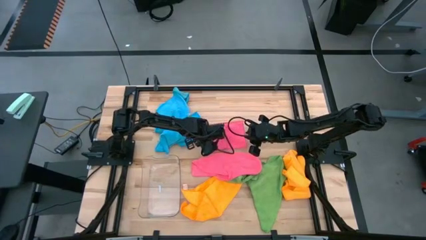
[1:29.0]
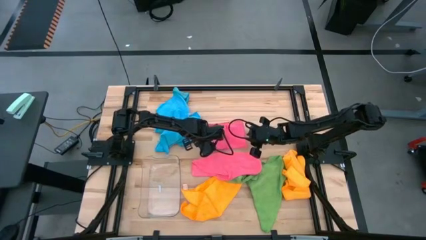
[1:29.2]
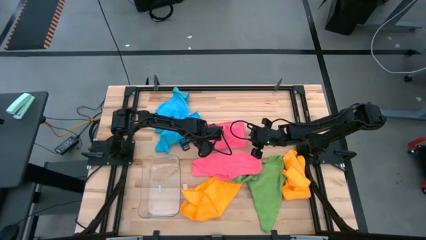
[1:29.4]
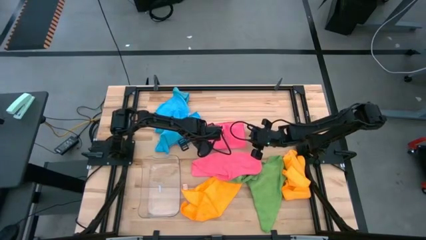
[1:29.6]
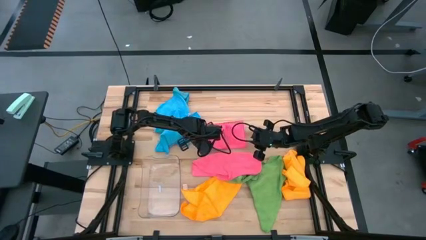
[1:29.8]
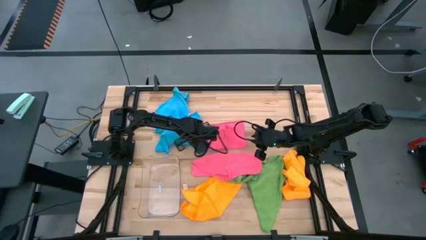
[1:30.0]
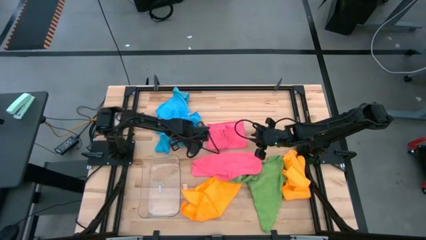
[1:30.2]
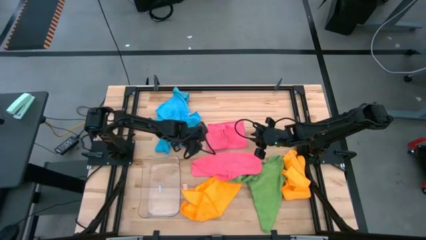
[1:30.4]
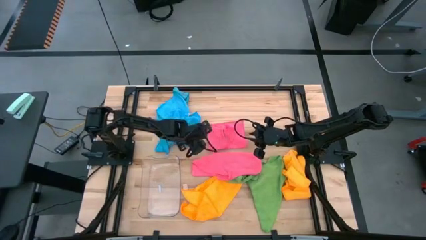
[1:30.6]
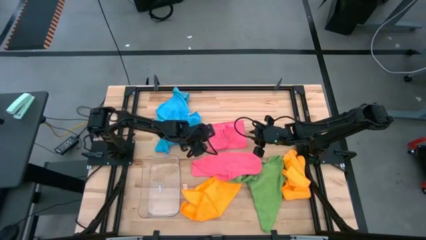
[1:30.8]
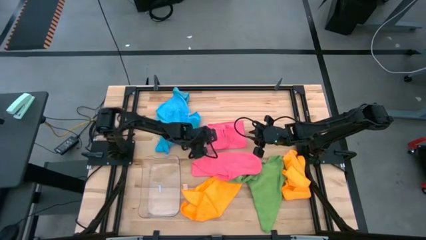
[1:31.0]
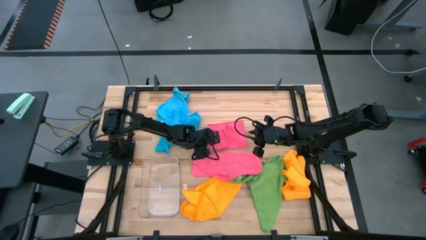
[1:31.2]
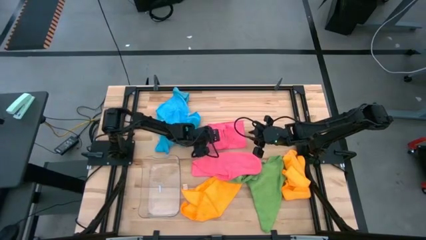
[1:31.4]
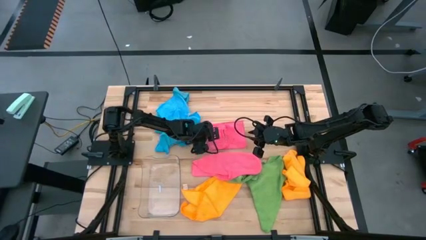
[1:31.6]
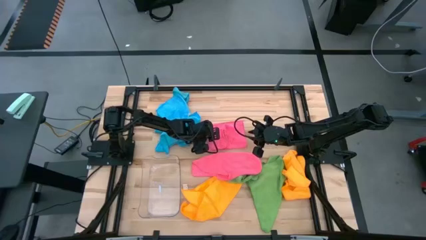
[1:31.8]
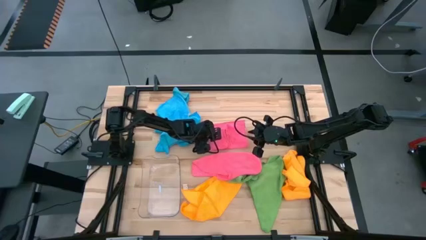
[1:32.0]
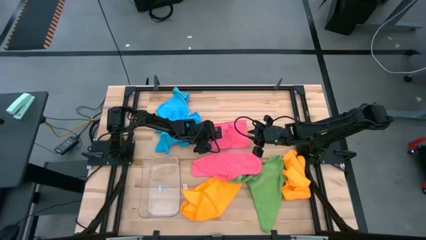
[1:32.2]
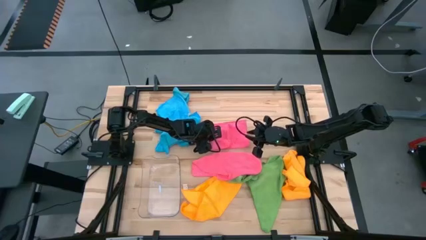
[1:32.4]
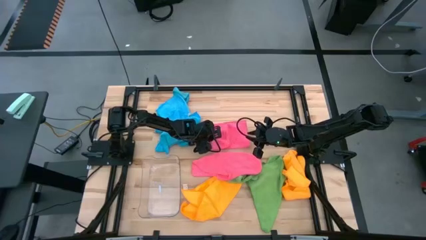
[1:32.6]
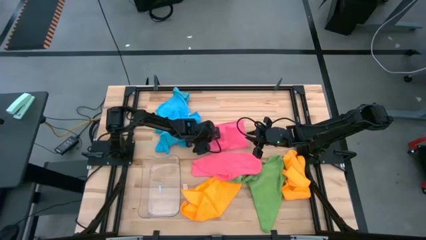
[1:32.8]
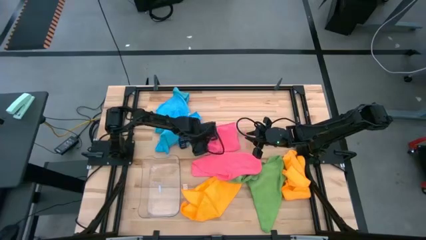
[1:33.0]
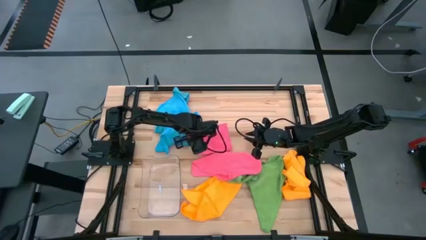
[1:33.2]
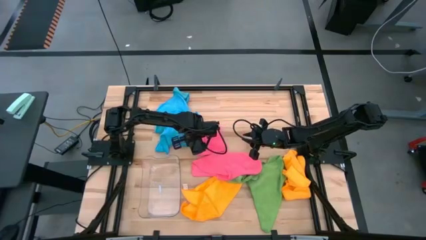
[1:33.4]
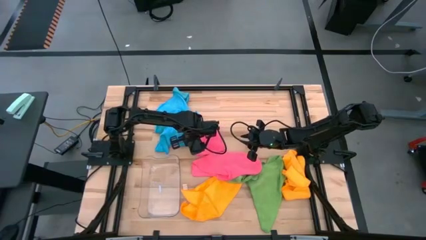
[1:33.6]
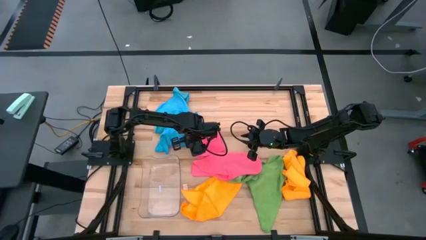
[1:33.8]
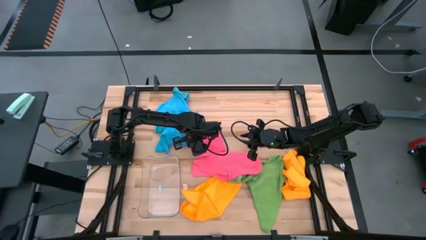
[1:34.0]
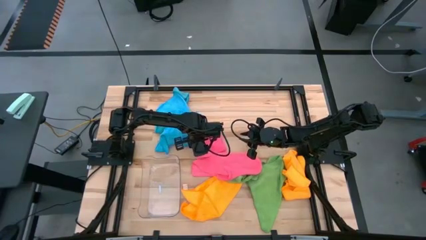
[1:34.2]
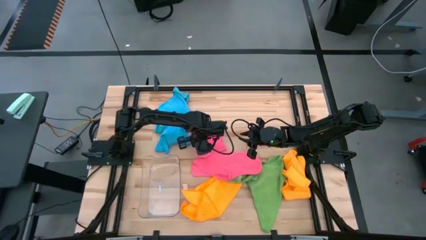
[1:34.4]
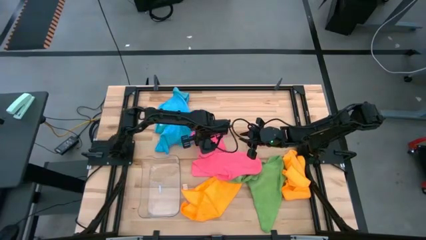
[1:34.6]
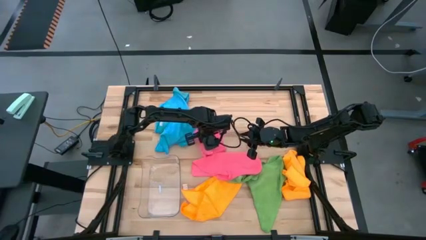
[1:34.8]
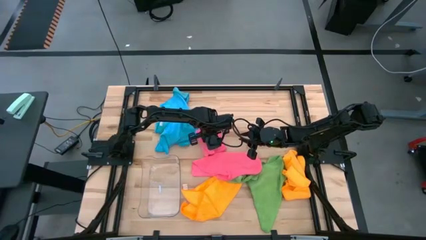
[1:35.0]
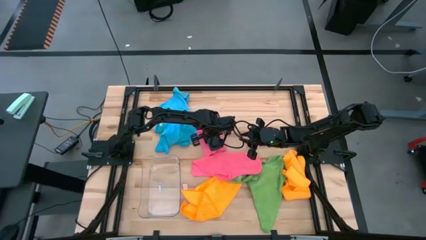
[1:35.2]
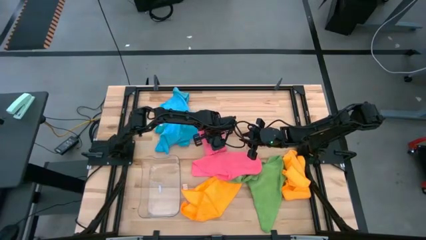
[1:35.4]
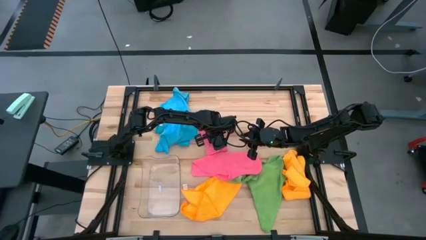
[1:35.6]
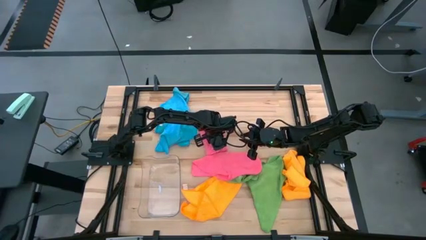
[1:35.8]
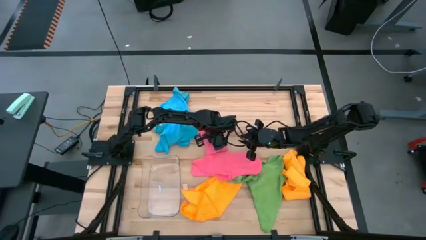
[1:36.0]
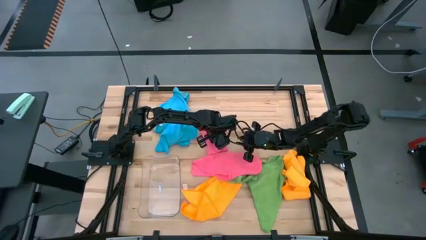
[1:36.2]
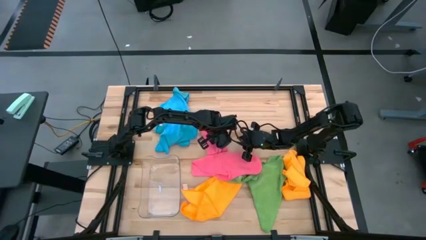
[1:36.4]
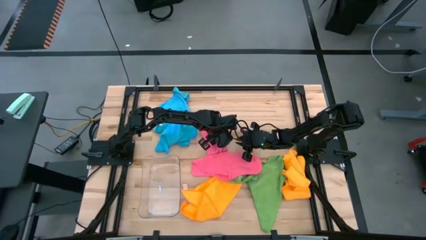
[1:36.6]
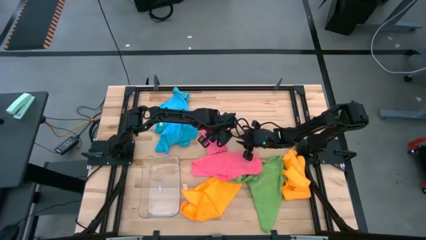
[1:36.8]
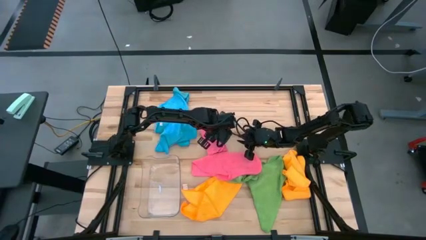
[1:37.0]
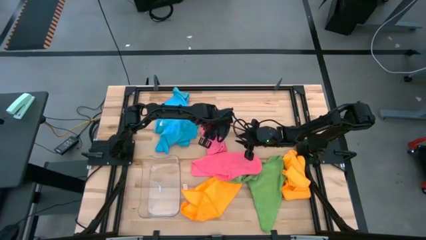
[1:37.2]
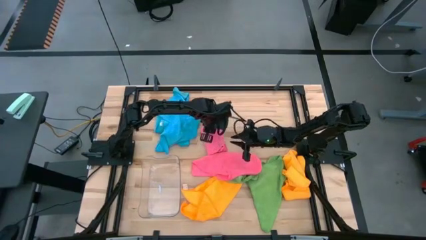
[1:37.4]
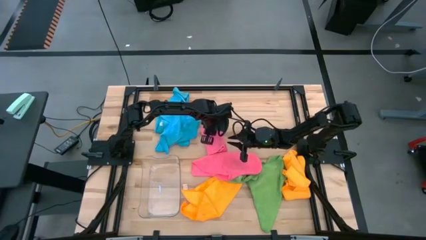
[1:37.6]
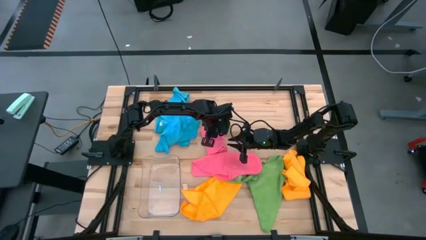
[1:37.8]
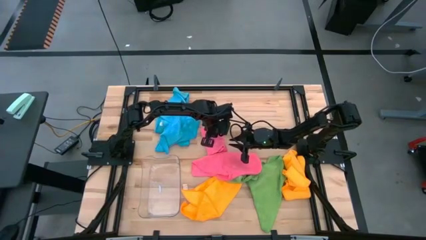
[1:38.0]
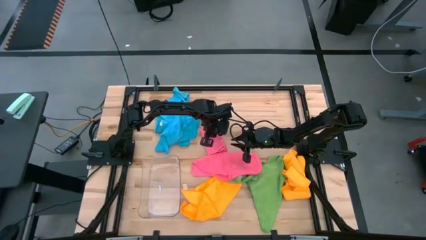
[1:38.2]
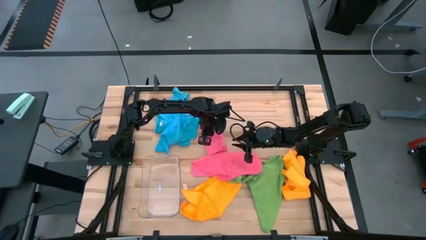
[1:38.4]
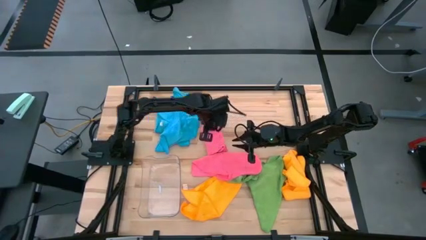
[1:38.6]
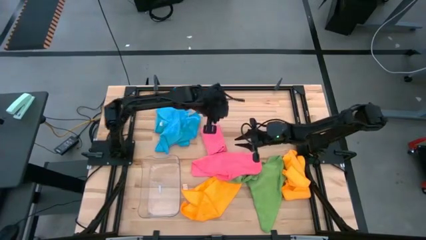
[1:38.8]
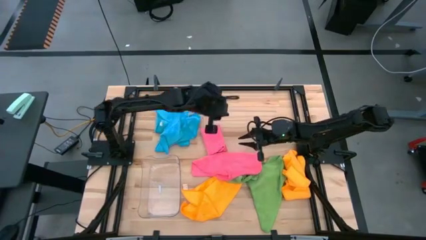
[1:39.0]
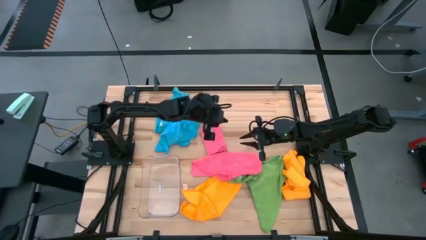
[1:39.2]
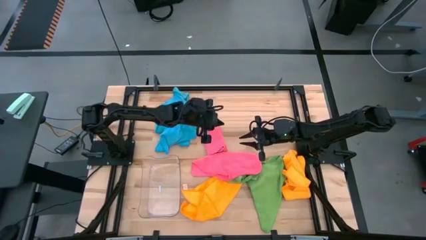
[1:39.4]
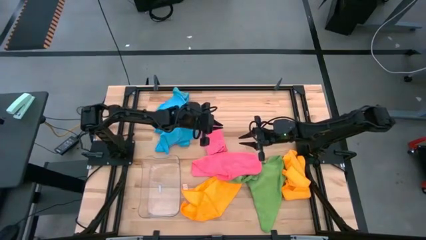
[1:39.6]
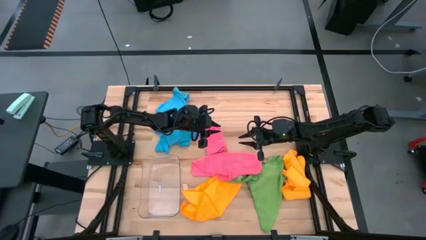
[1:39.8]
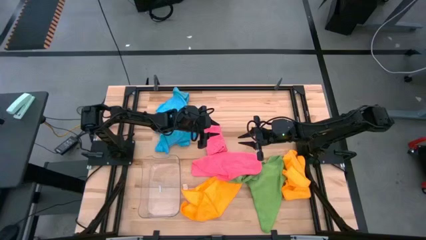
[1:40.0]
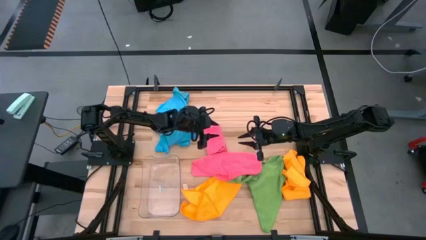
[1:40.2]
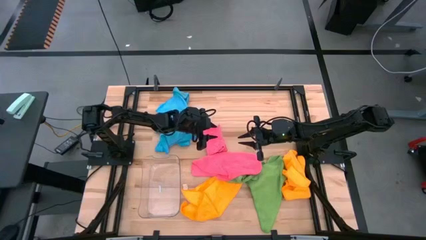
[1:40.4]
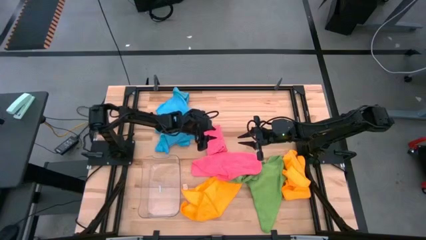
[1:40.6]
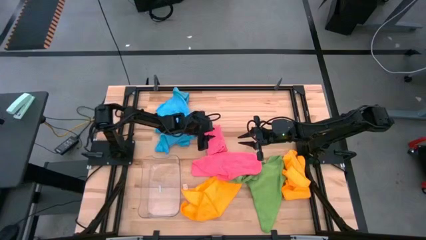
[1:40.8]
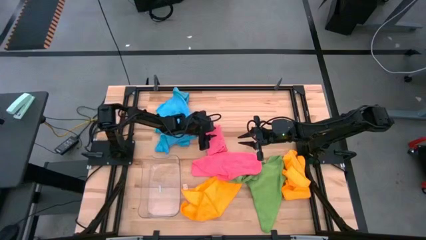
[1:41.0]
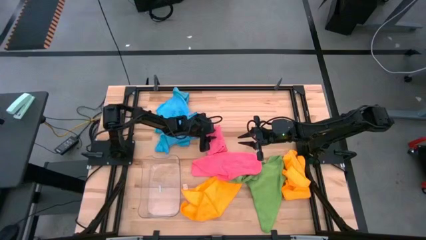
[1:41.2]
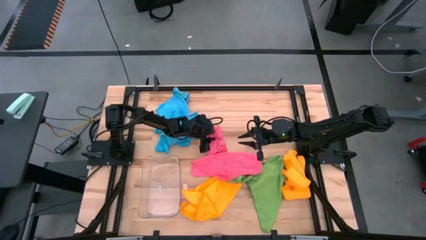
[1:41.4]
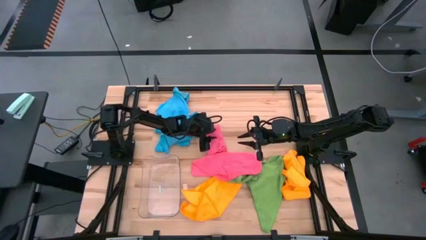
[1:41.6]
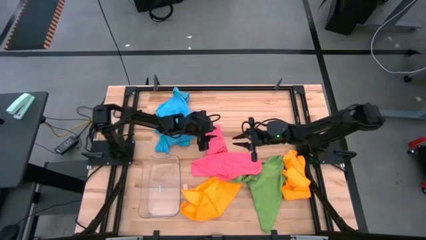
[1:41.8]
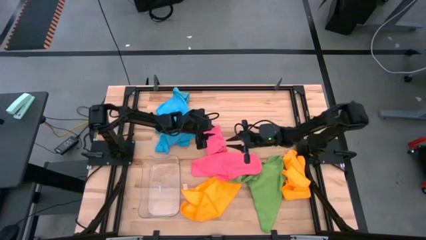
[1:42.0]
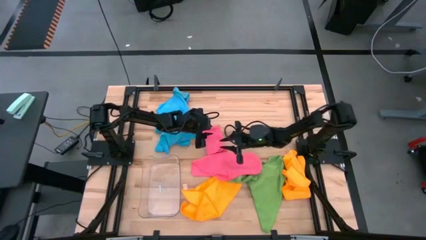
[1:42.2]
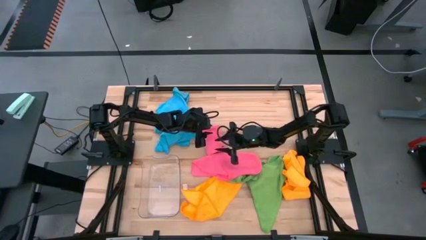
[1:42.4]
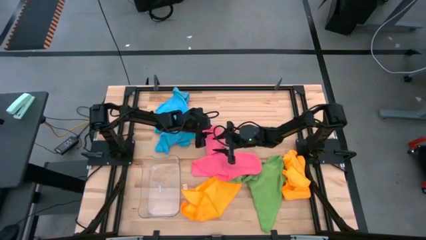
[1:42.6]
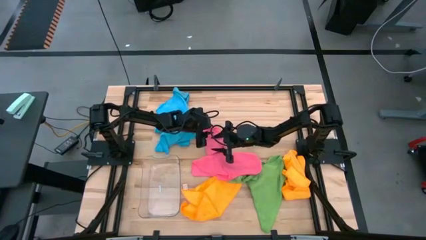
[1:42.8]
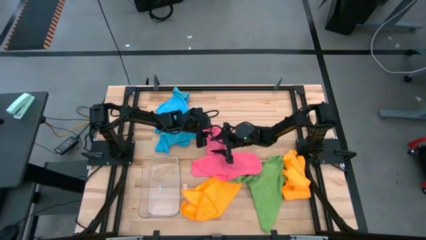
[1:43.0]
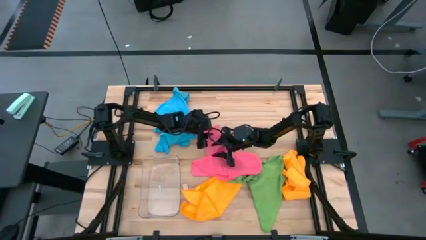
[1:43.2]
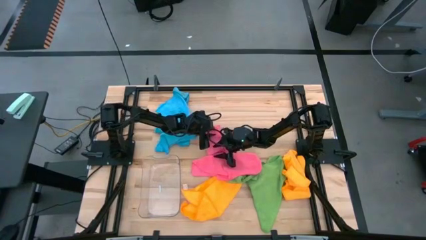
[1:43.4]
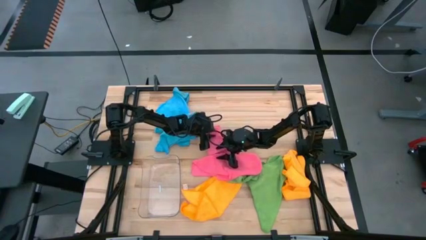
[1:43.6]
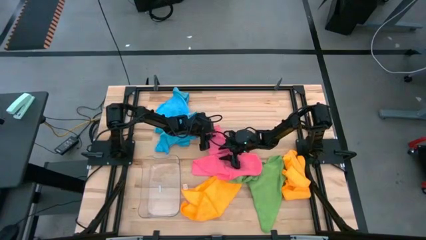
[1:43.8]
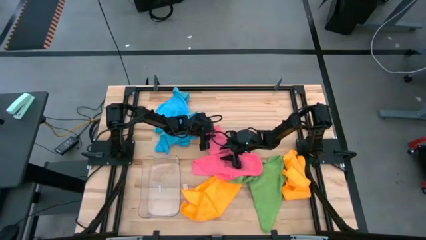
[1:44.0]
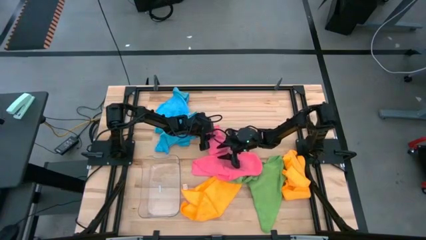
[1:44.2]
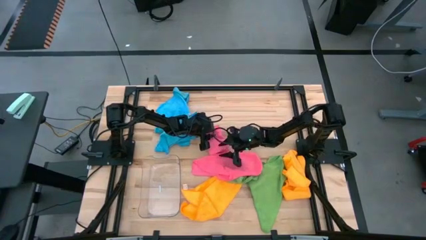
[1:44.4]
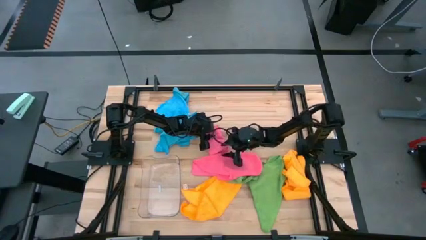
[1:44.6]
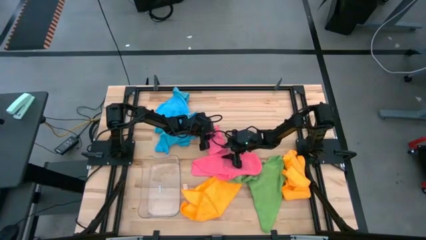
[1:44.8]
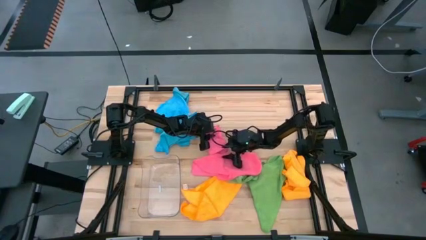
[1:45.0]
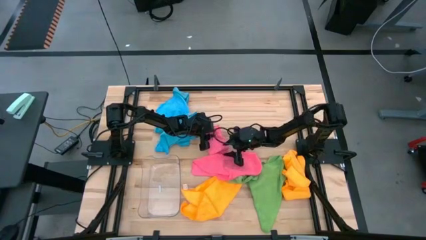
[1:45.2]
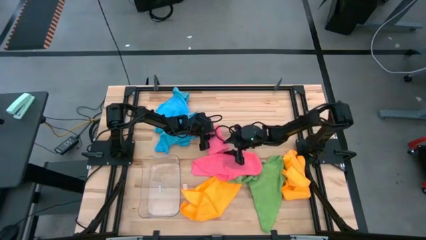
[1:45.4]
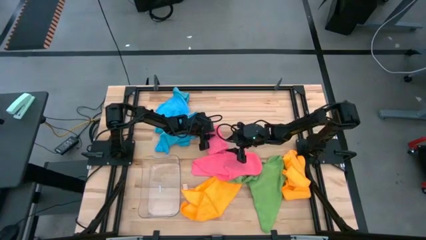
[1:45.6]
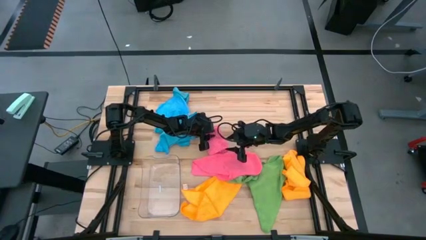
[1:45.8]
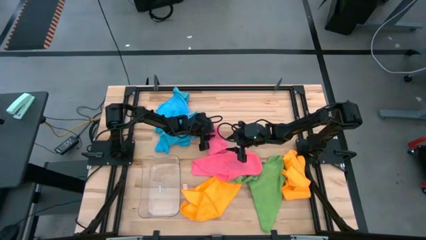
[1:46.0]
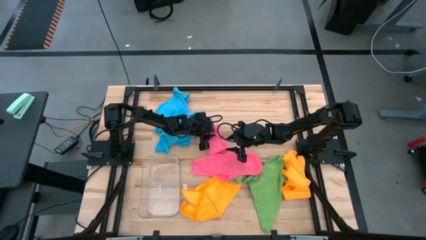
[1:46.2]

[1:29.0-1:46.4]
Task: Fold microfiber towels
Fold the top pink microfiber cloth
